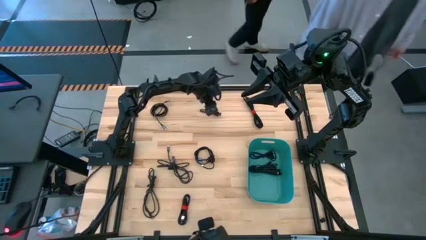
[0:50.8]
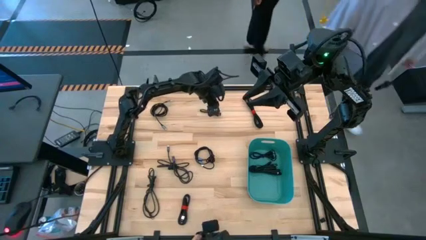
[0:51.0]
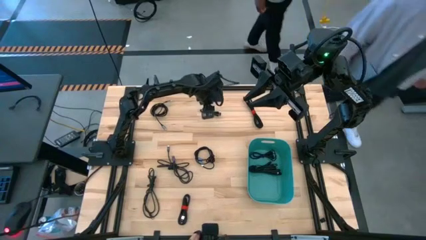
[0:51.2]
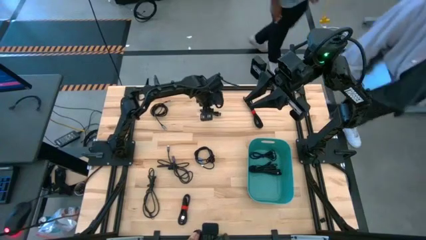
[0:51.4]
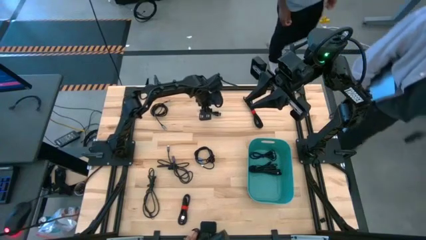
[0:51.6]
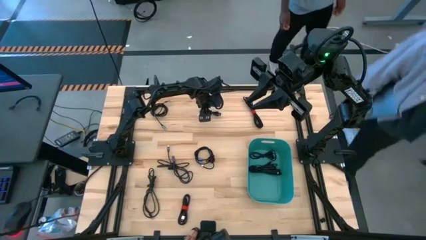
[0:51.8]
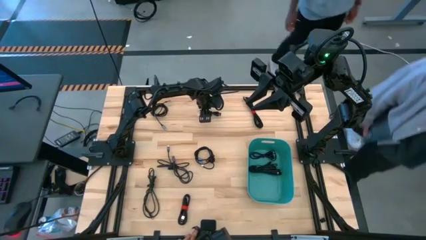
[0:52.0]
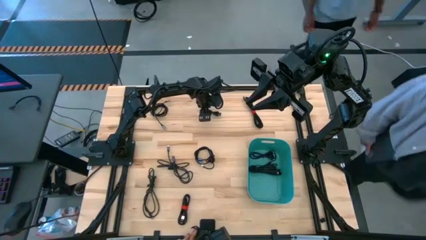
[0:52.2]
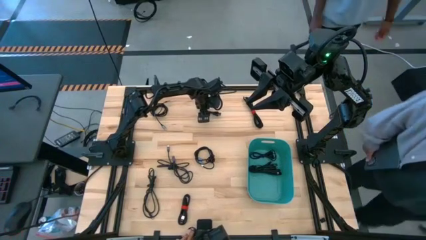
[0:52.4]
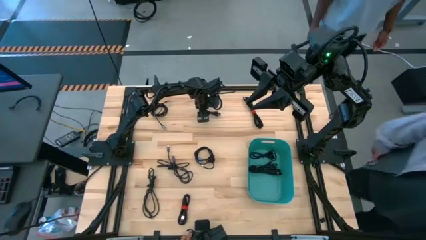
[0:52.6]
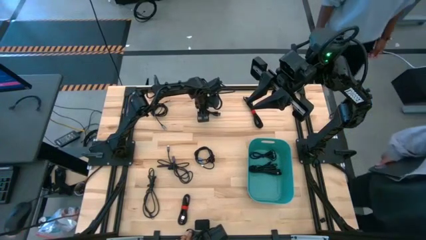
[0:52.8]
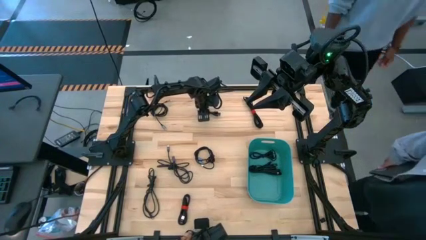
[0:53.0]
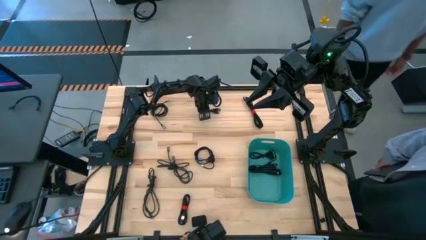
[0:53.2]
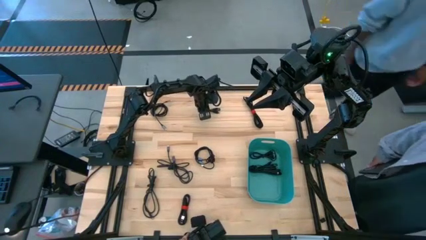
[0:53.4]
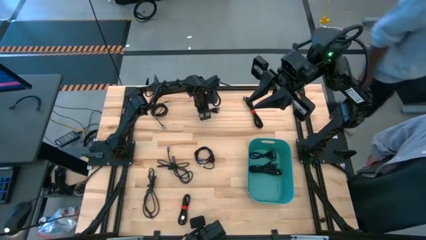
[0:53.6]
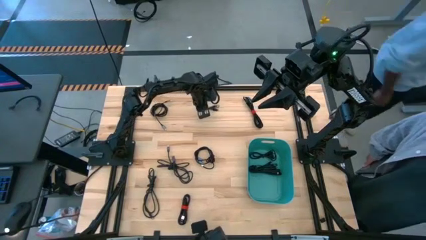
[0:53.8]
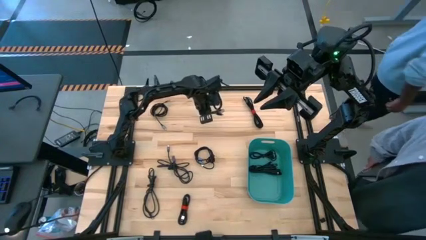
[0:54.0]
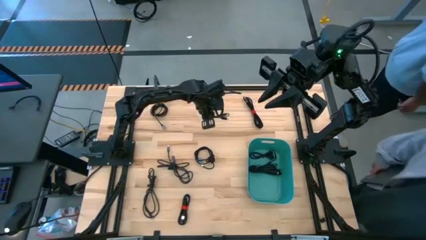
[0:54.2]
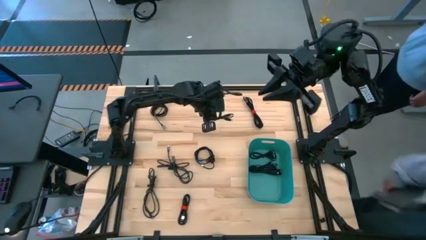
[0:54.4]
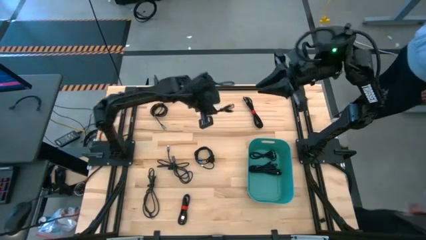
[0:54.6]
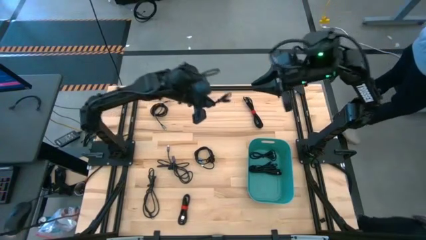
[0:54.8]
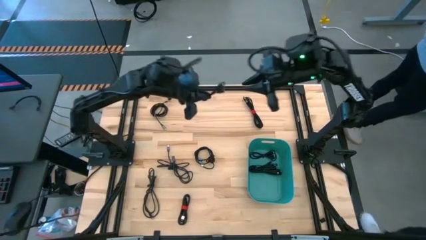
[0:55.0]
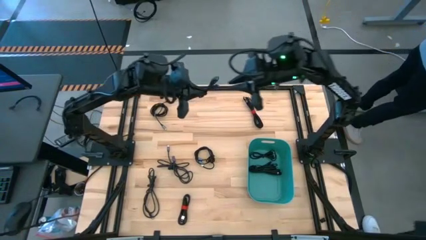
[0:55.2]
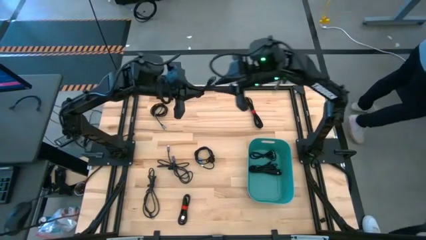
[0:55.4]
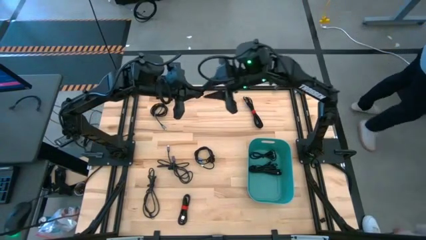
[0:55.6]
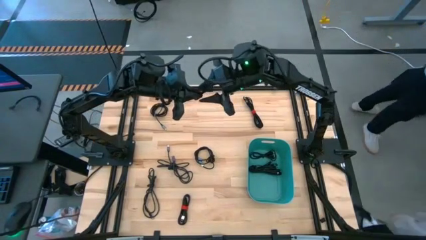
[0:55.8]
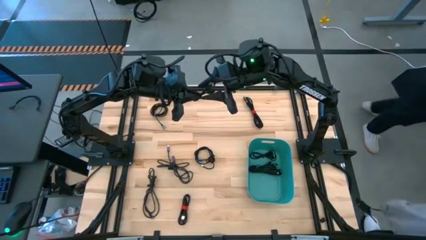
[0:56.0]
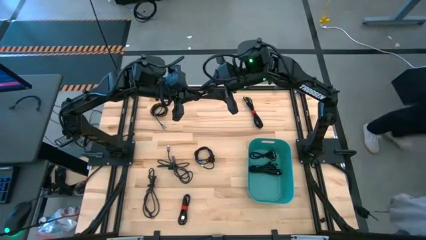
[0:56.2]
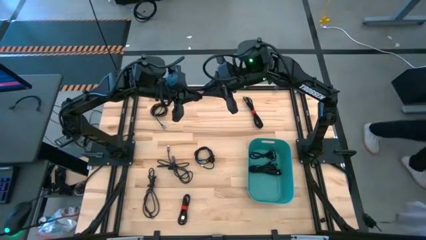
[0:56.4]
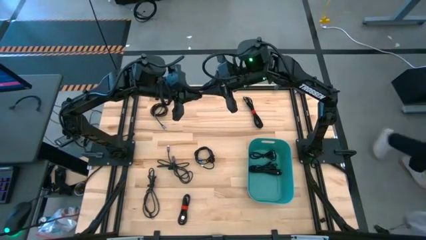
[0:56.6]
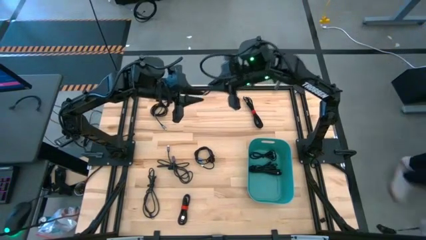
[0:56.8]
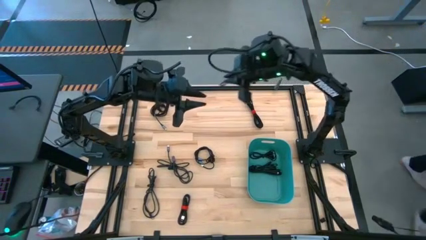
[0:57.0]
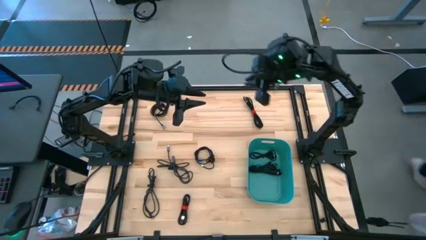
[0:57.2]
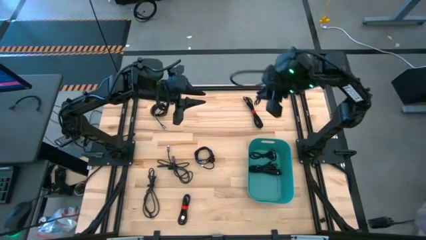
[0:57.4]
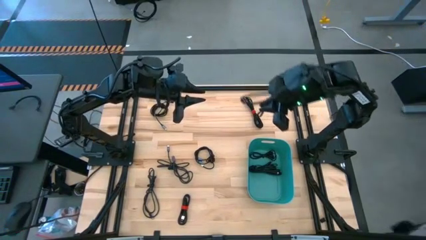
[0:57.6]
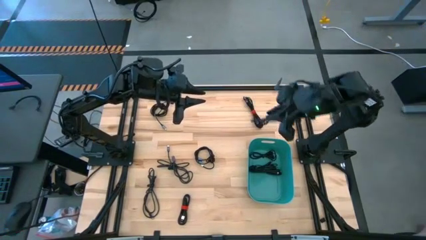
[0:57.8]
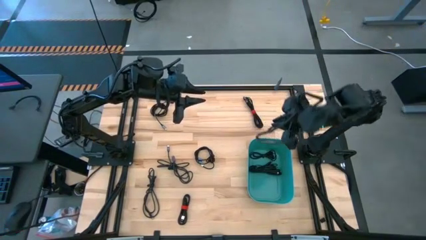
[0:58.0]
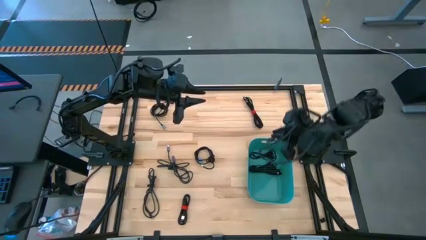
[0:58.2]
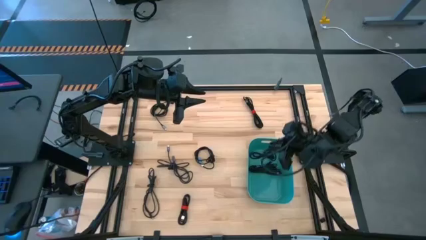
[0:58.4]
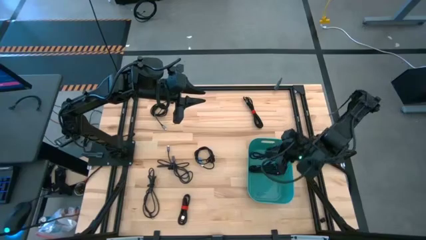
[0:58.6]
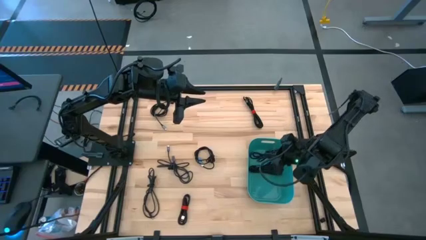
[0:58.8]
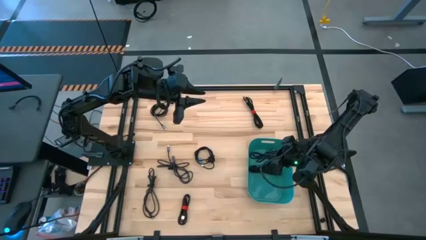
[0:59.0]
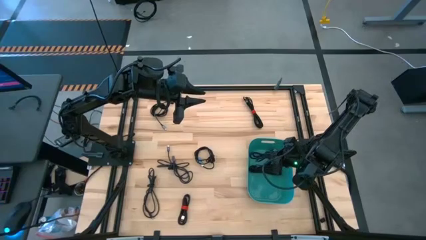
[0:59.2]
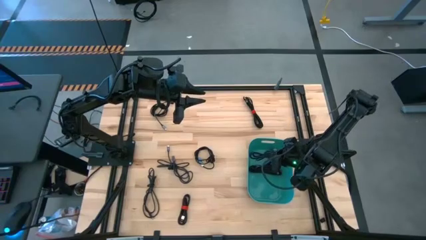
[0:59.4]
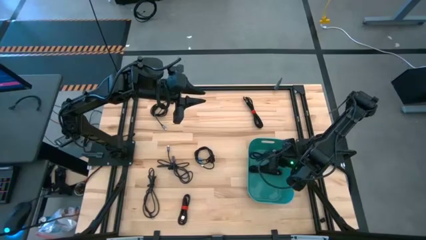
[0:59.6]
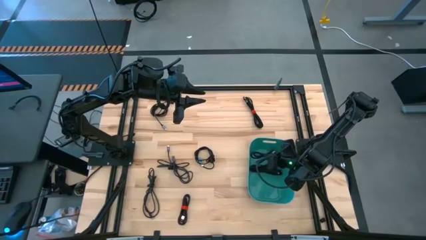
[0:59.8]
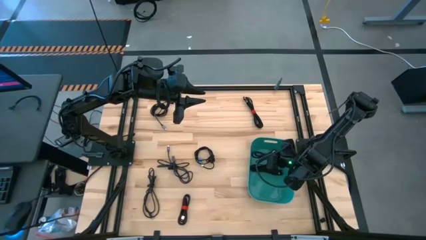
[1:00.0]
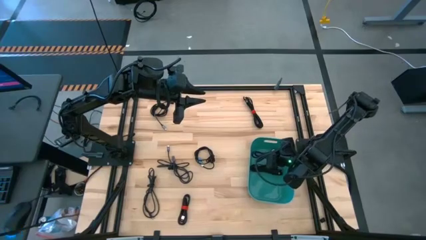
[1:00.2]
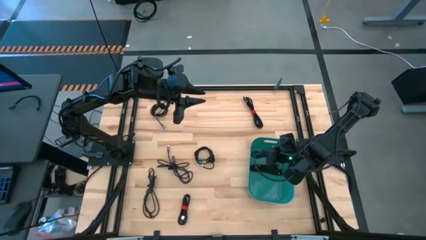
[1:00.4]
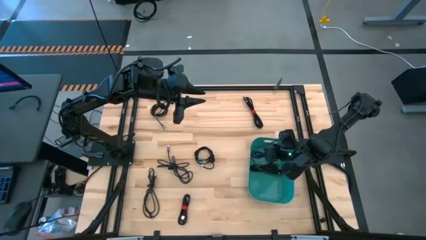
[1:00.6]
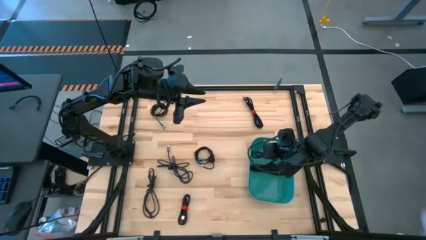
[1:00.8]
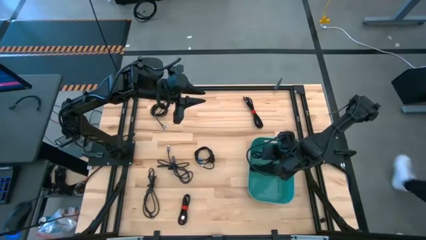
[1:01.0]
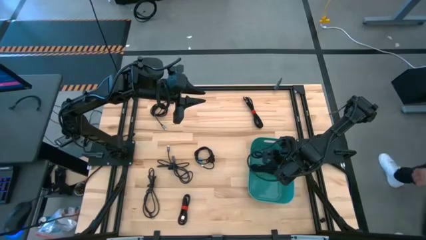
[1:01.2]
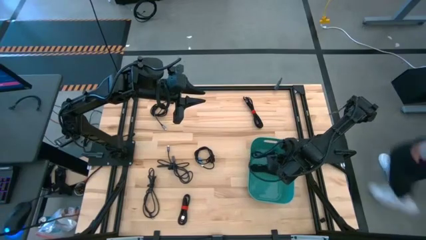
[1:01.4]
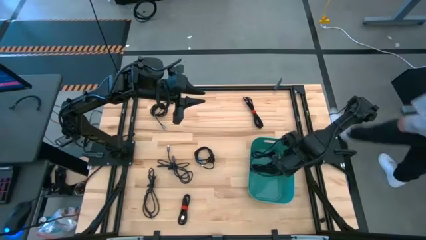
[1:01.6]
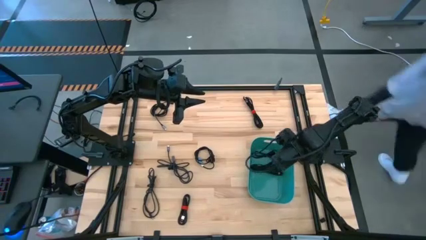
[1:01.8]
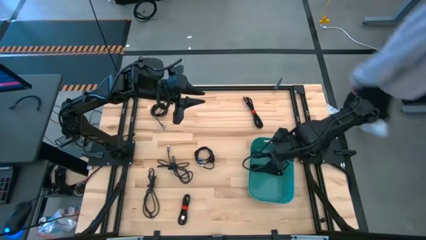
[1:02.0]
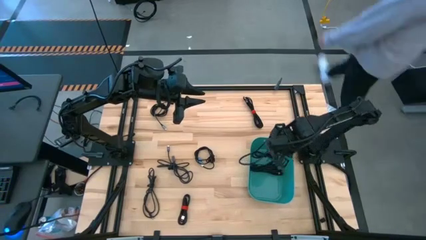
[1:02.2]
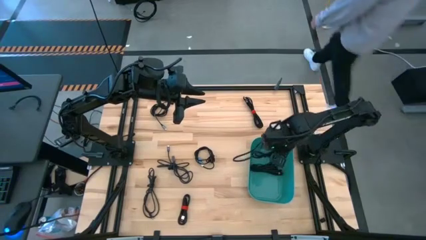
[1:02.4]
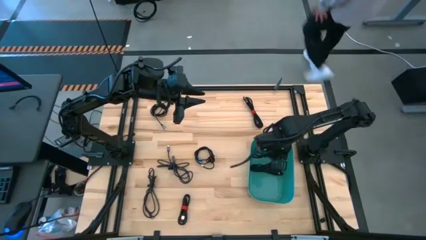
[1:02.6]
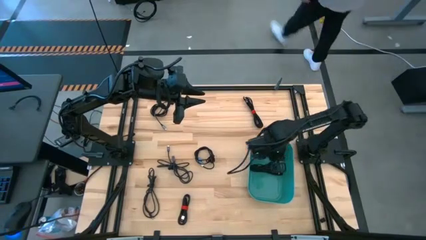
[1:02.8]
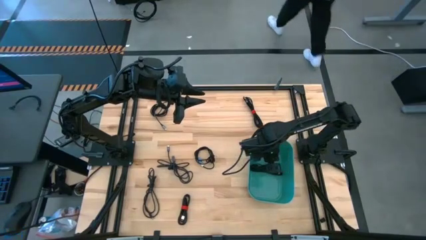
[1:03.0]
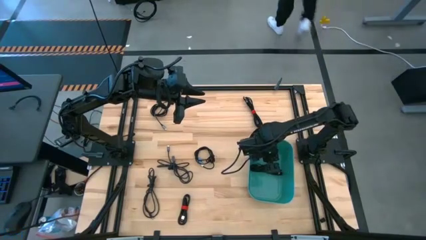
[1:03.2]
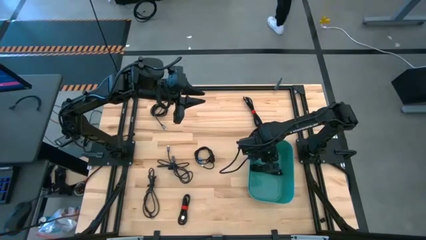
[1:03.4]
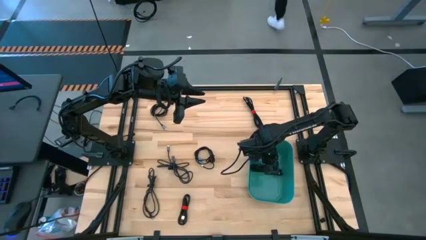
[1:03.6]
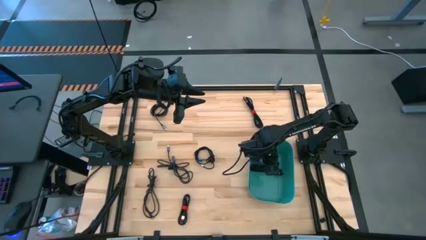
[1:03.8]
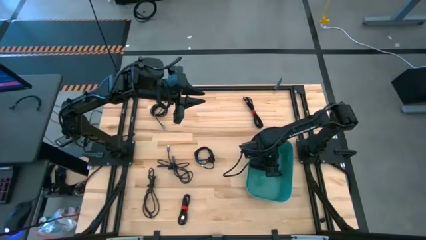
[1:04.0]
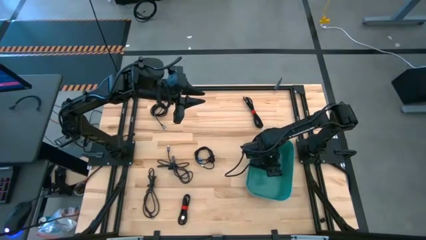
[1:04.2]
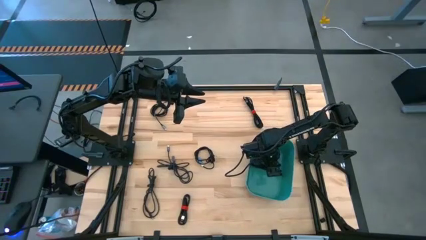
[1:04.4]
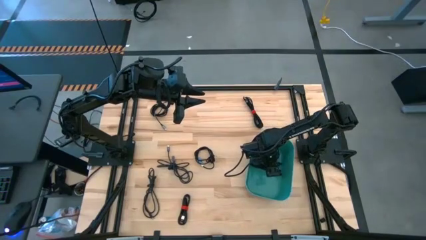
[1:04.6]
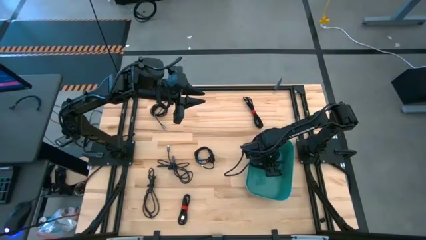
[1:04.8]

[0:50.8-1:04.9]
Task: Pick and place USB-C Cables
Put the black charger cable into the green bin

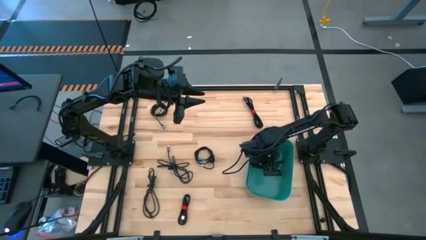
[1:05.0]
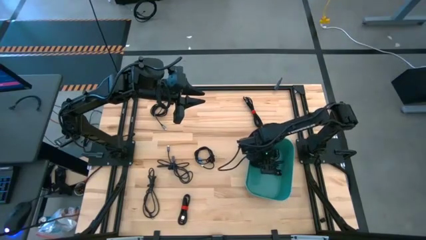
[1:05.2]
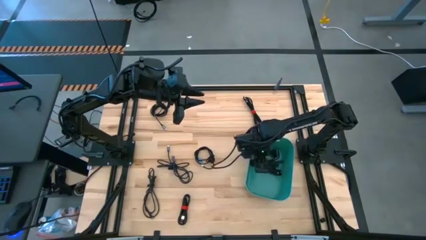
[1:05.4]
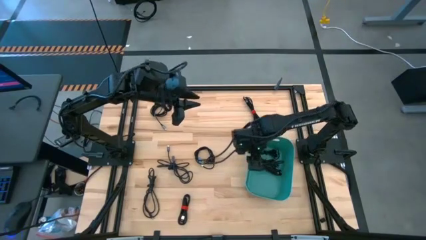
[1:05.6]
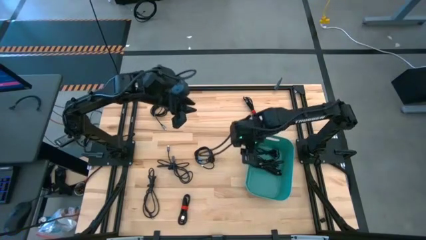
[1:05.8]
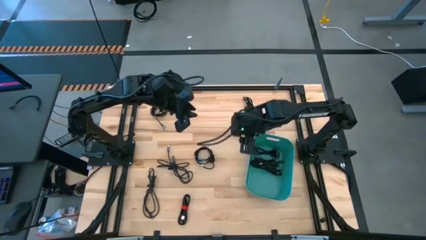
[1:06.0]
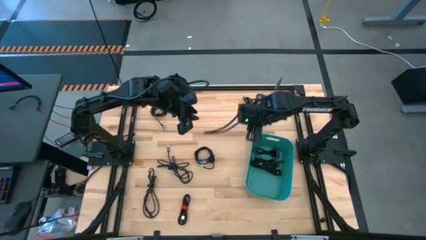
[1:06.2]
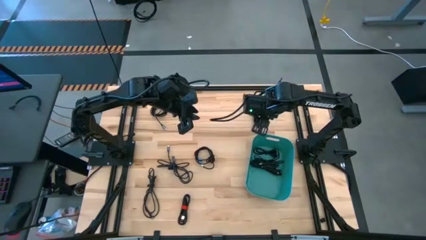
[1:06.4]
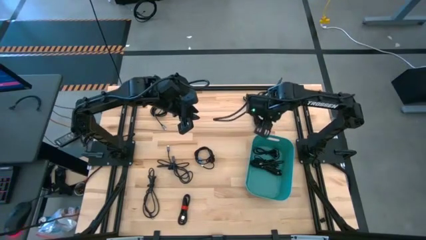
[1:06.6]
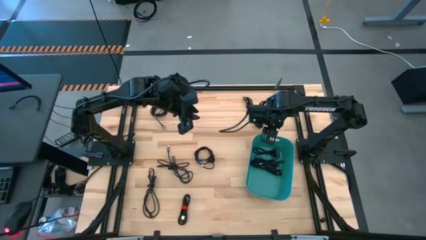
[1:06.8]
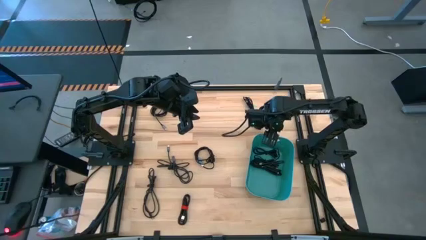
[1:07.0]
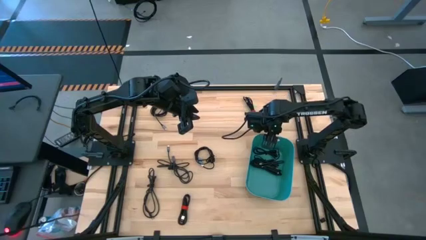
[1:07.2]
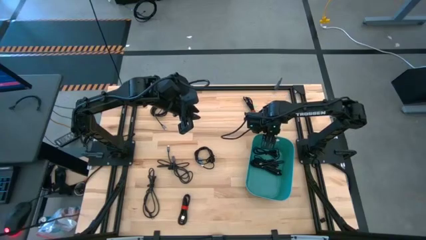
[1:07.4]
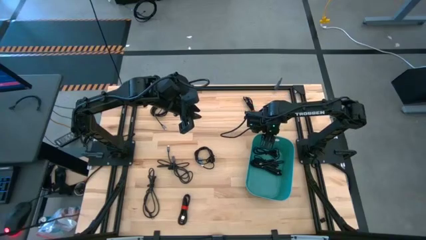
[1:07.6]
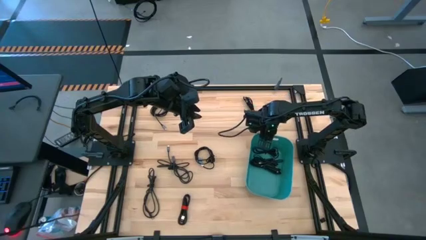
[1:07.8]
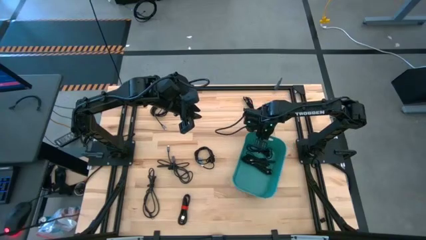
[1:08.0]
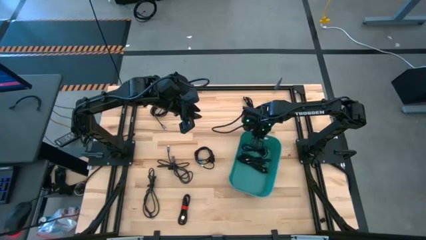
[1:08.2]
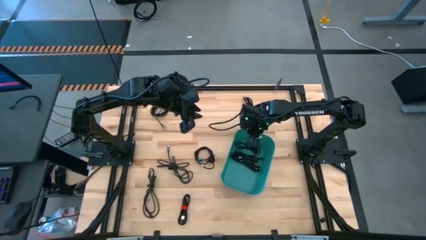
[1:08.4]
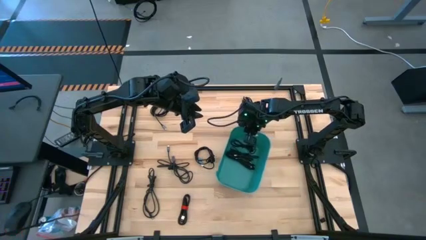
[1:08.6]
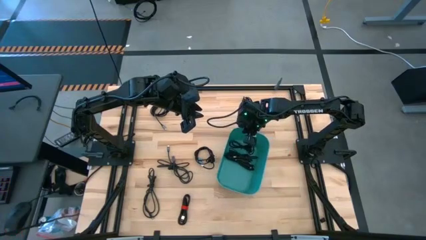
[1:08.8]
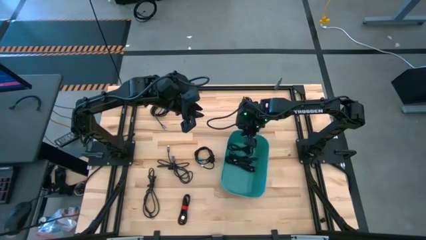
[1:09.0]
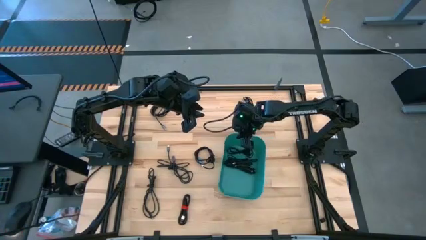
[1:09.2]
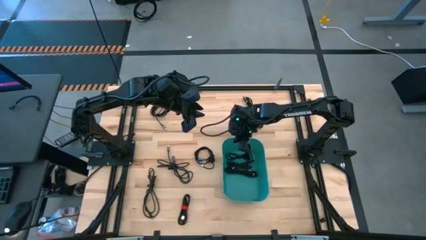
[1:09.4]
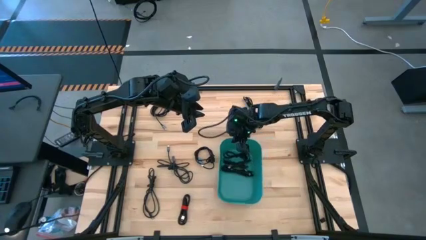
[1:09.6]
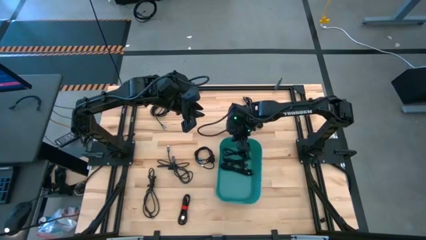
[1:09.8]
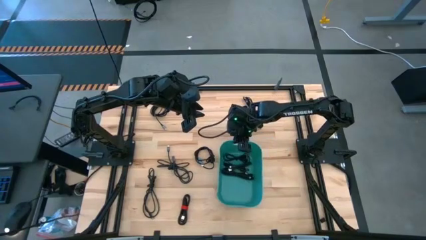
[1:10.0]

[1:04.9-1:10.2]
Adjust the green bin
